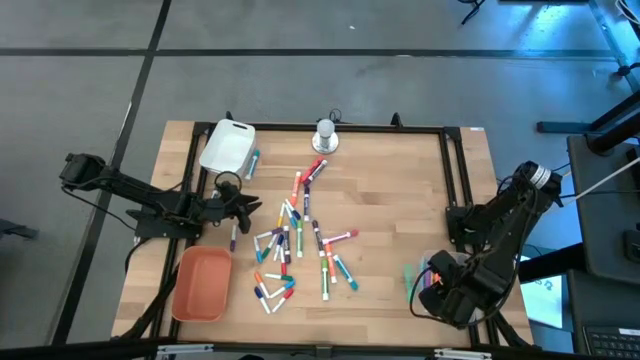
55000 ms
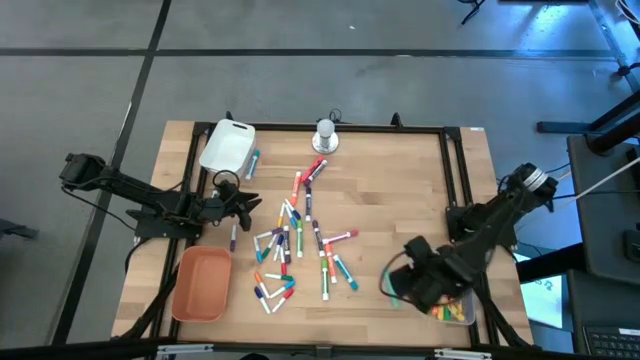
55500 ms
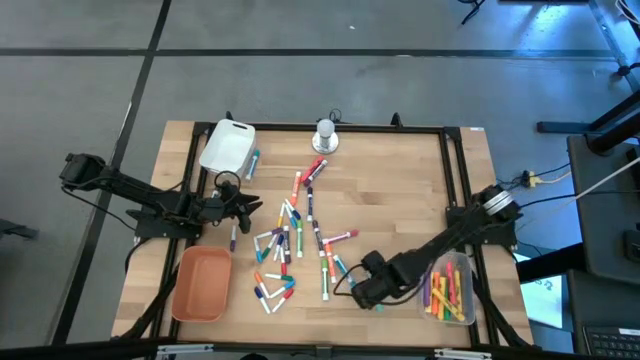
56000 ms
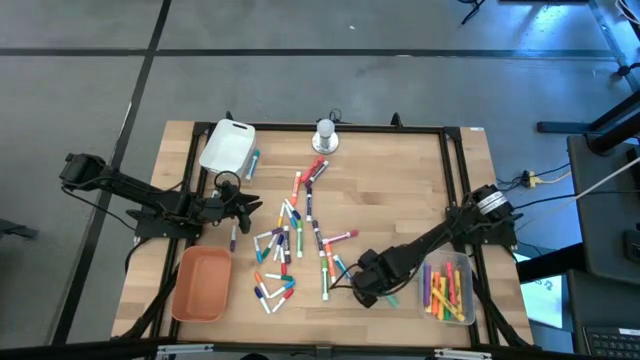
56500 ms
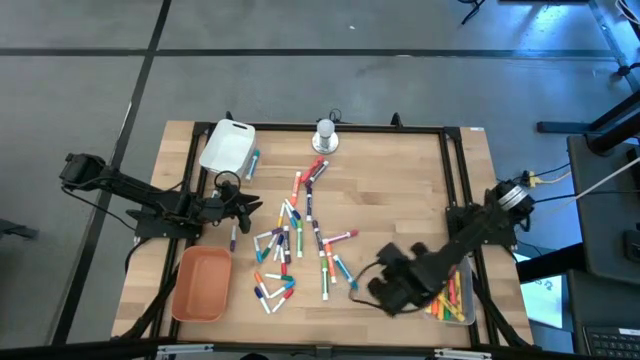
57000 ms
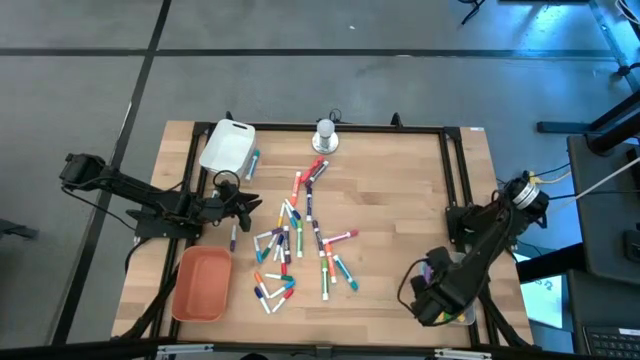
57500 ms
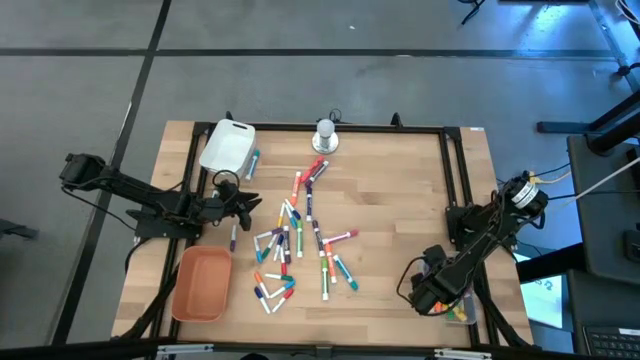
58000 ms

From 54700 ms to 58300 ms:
Task: Pick & Place Markers
Put the light blue highlighter pen into the transparent bin

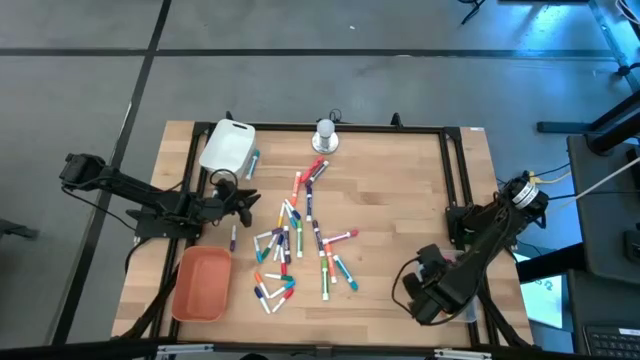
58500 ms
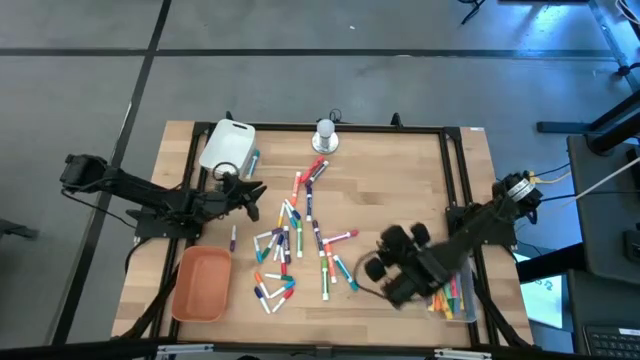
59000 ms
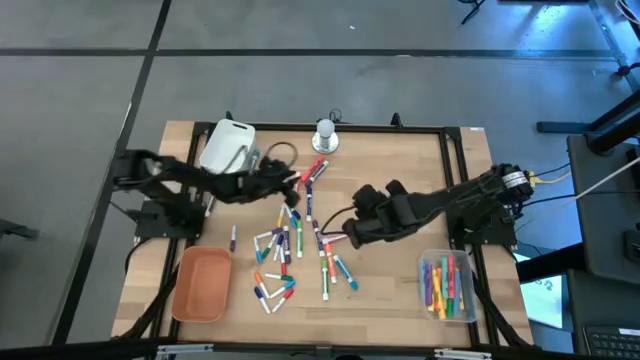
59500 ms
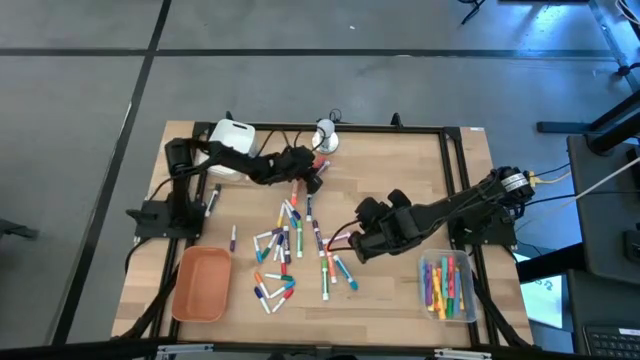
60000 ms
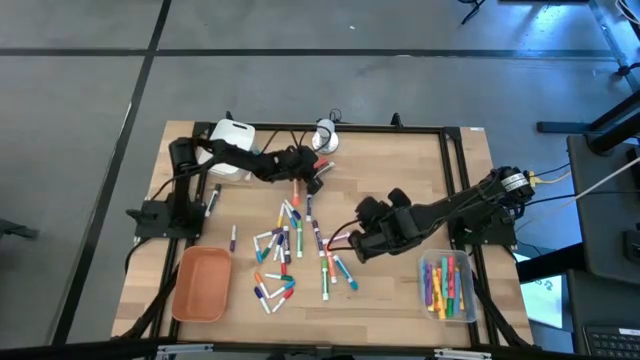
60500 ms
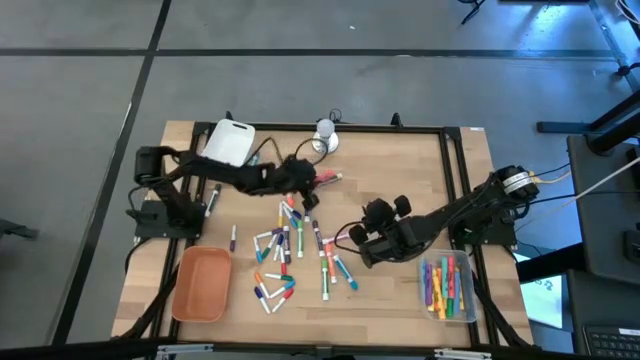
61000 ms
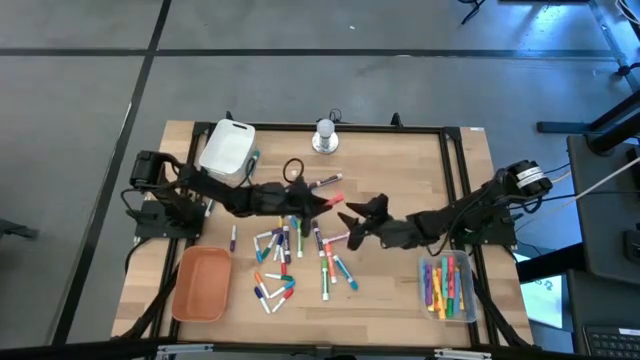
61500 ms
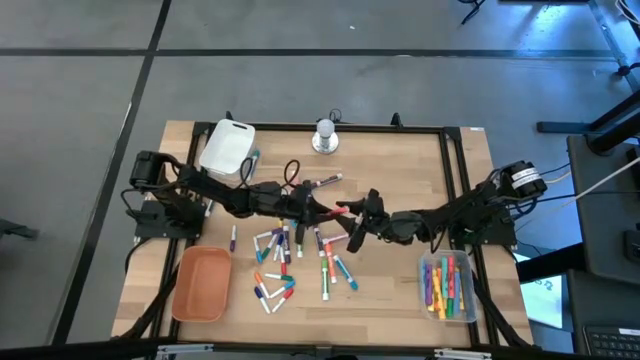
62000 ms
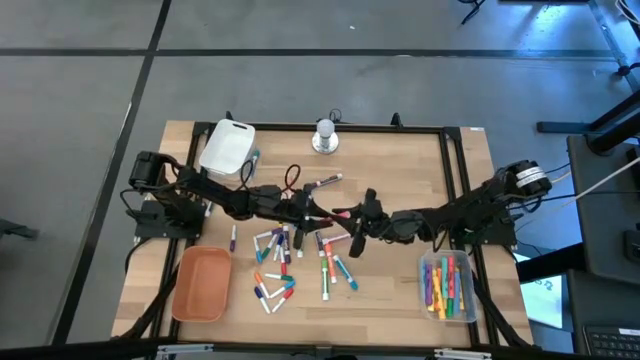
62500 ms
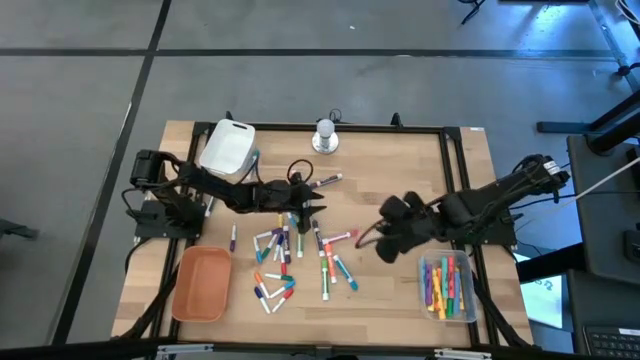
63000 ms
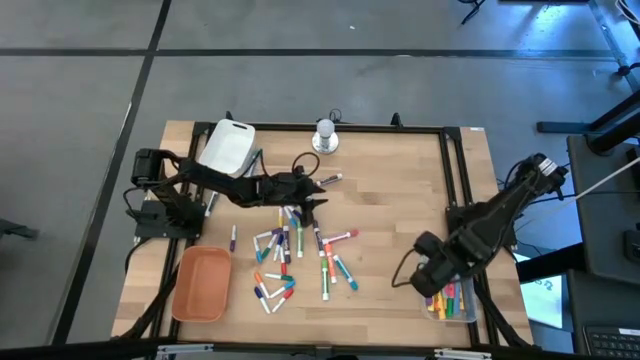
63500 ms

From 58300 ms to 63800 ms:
Put the pink highlighter pen into the transparent bin

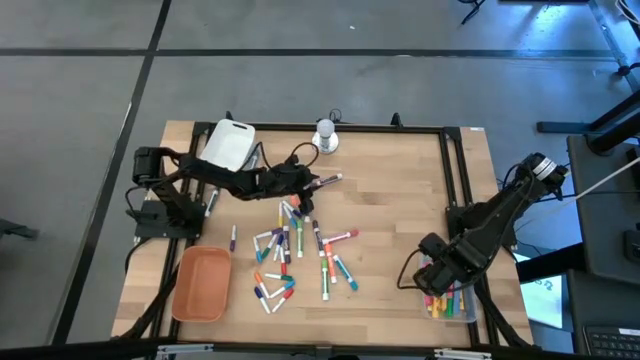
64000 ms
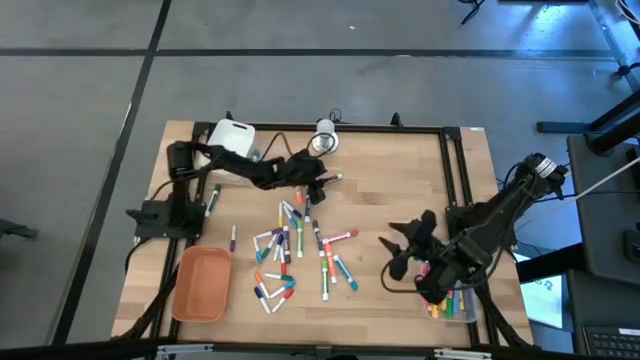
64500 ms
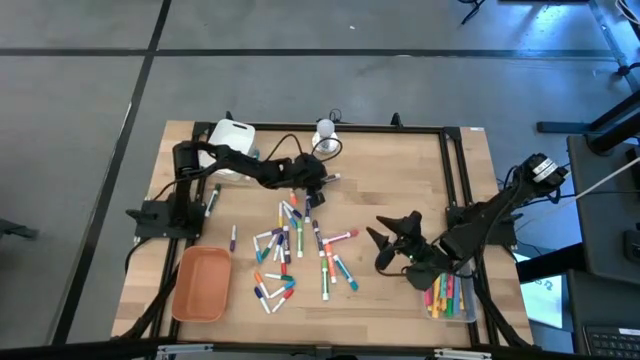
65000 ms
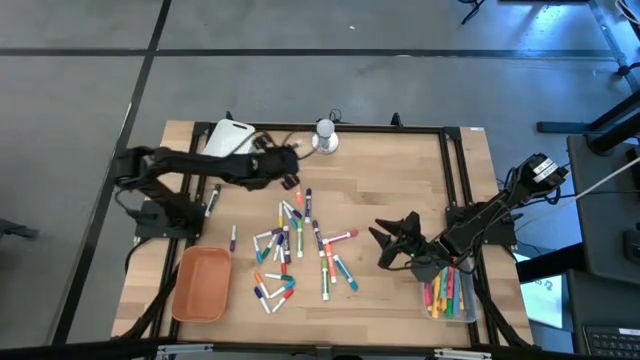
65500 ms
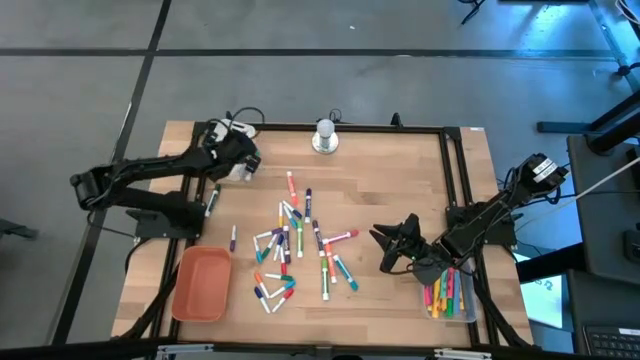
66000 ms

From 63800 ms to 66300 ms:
Put the violet marker pen into the white bin

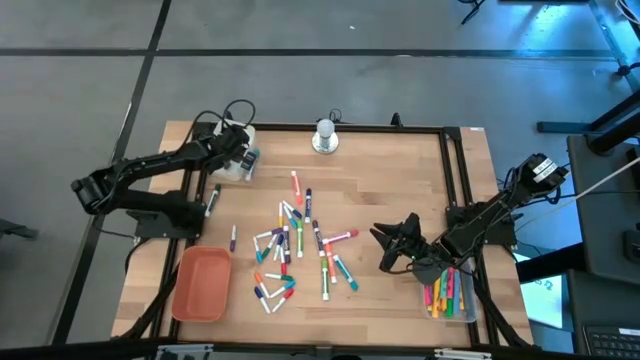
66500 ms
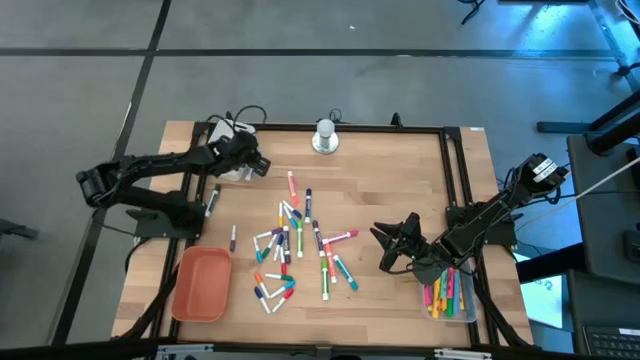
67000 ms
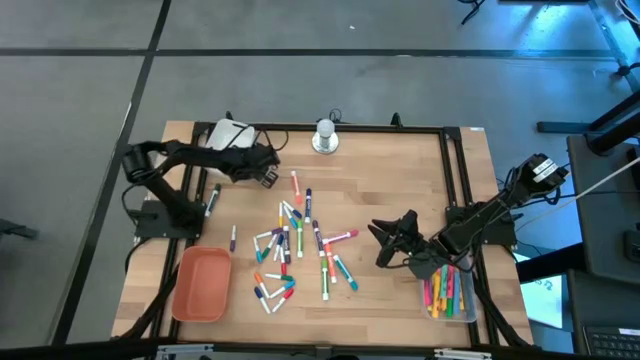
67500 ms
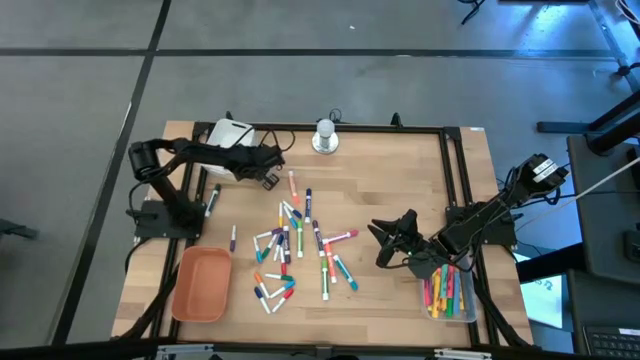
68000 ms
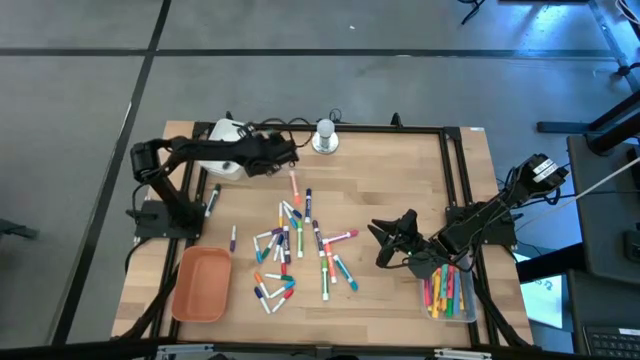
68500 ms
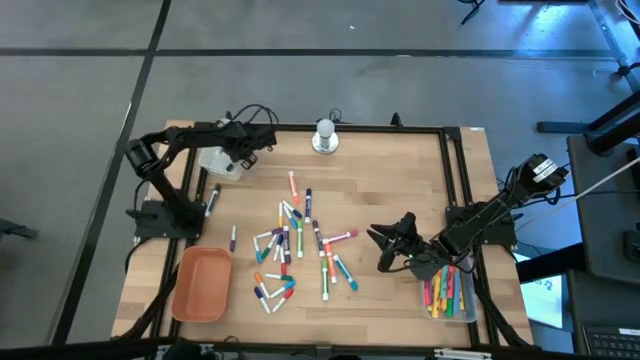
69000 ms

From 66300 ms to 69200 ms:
Put the light blue marker pen into the white bin

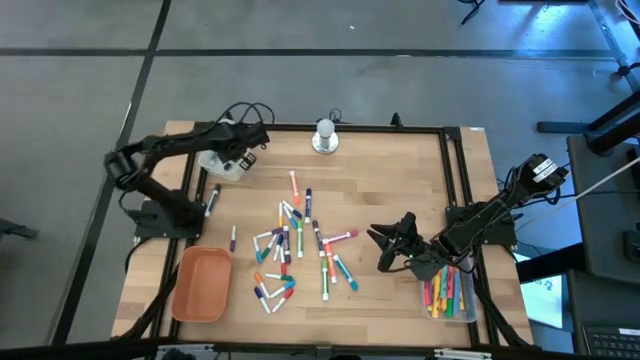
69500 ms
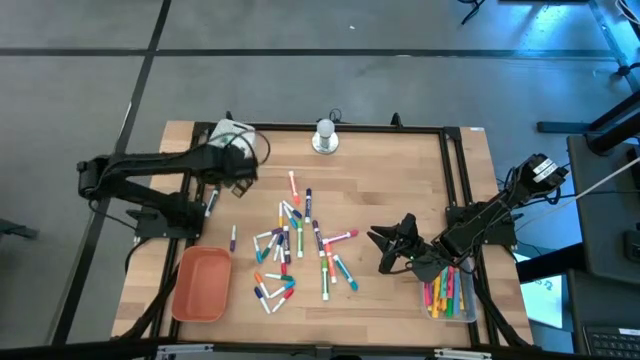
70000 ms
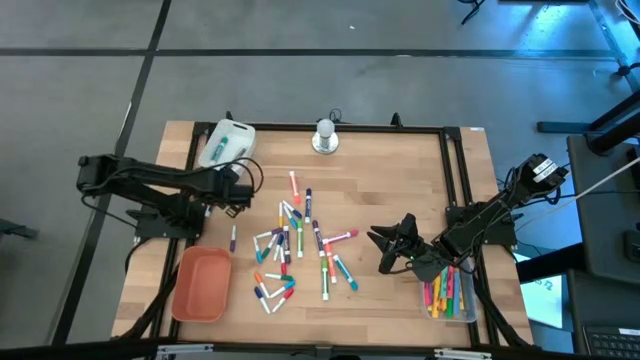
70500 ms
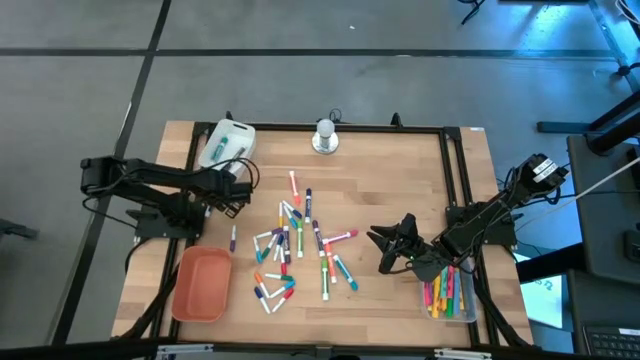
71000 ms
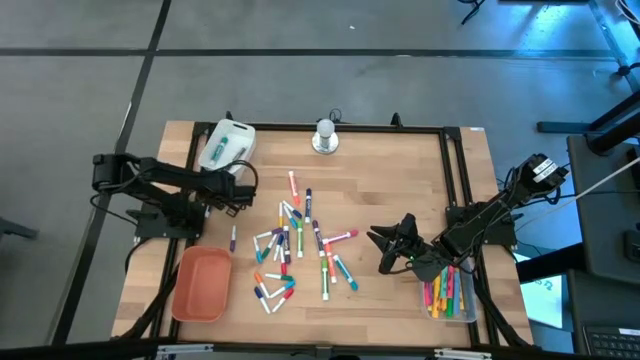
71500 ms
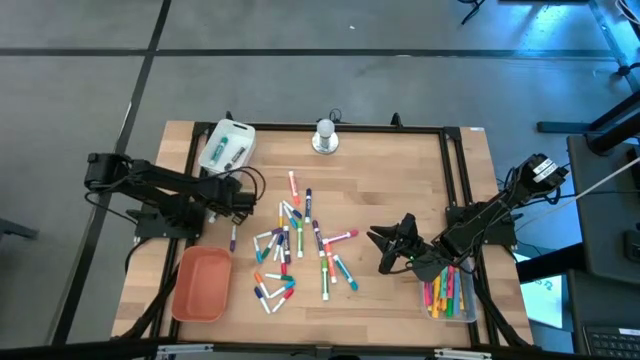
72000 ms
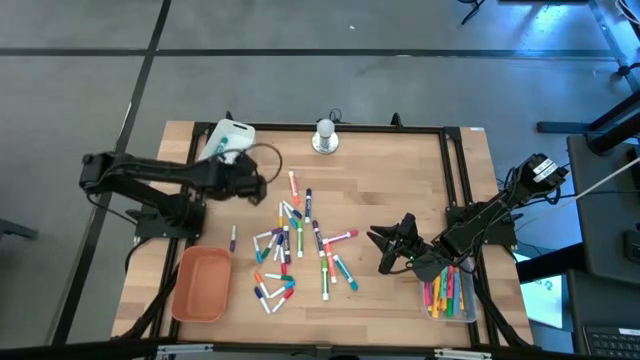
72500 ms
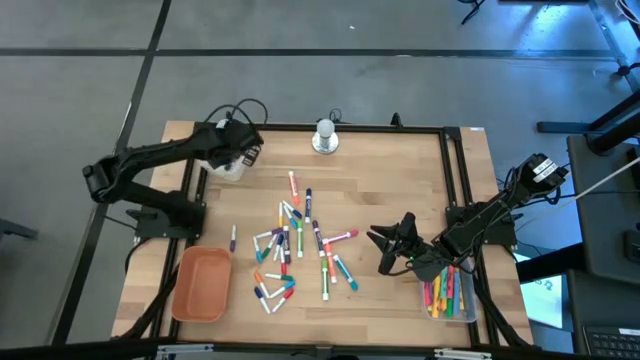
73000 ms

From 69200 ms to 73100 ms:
Put the dark green marker pen into the white bin

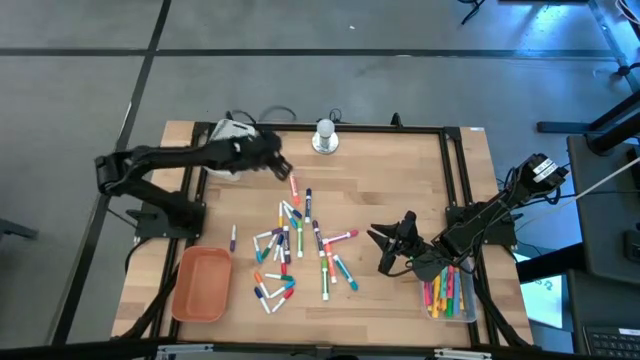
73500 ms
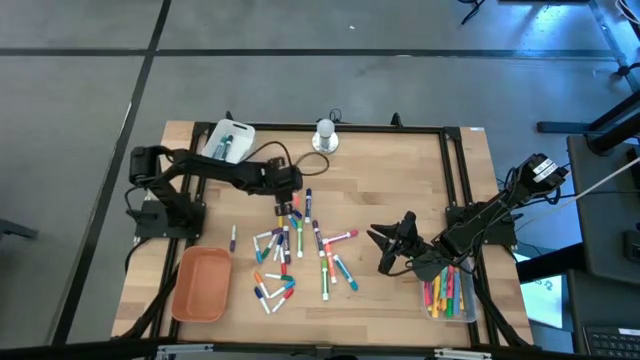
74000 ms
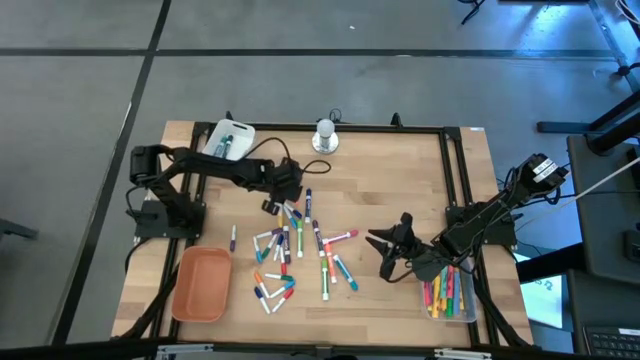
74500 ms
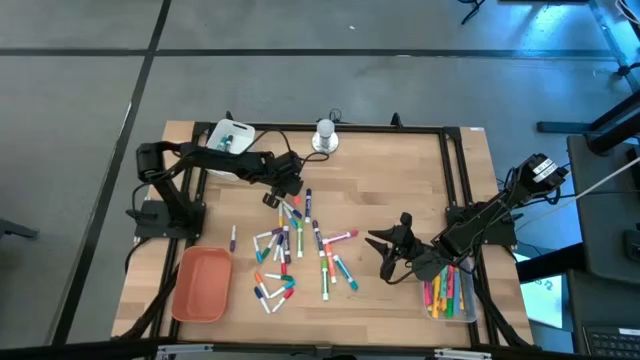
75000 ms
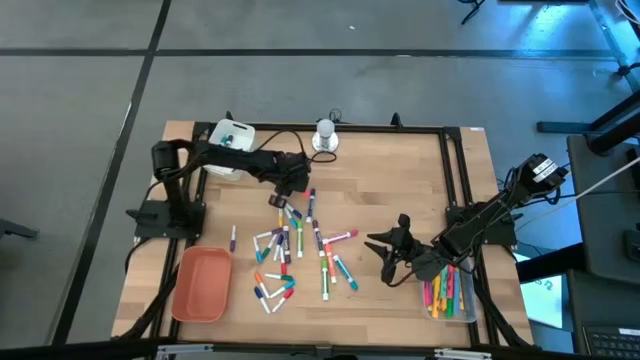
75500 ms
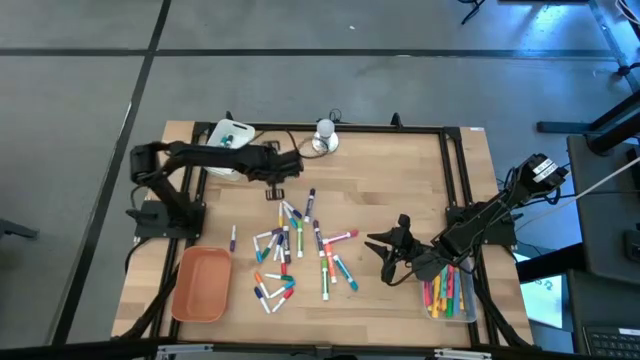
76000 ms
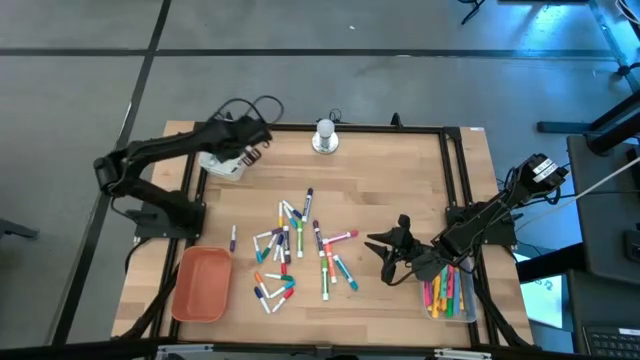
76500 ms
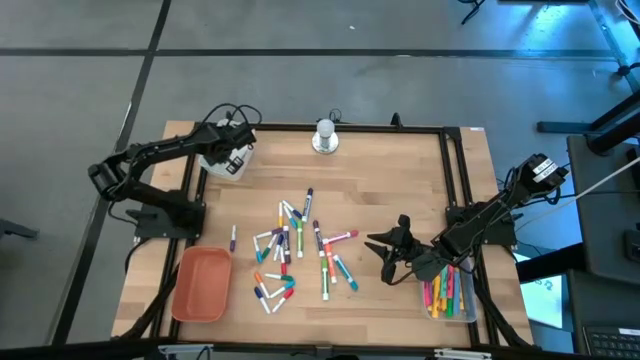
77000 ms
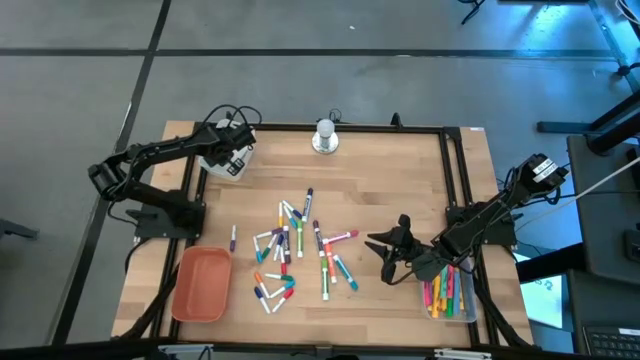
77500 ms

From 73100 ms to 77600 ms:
Put the orange marker pen into the white bin
